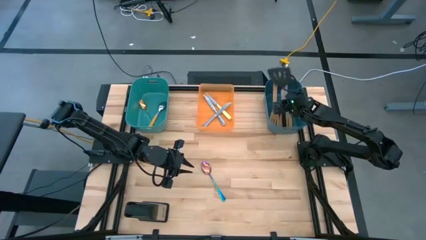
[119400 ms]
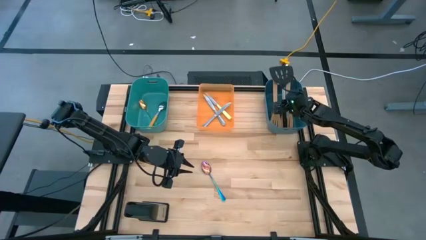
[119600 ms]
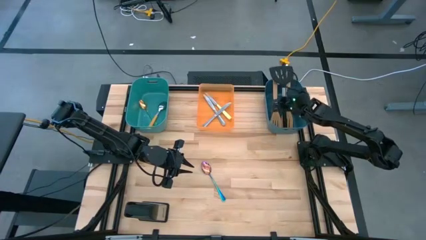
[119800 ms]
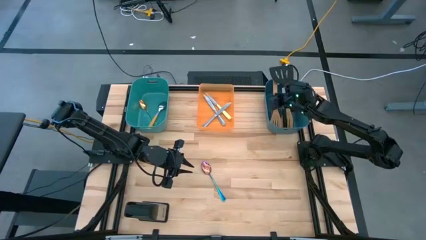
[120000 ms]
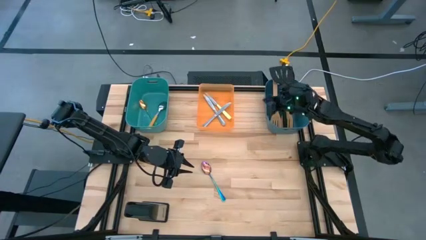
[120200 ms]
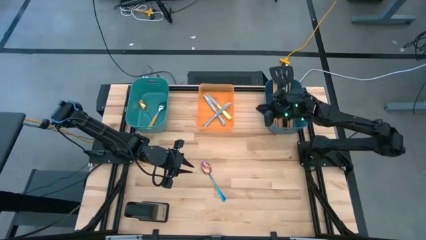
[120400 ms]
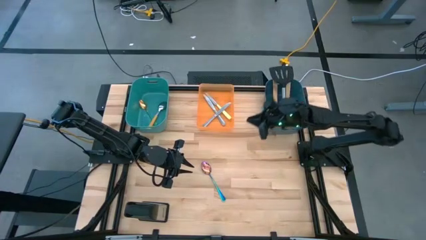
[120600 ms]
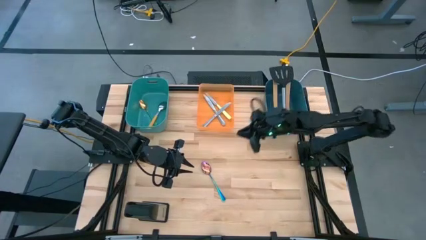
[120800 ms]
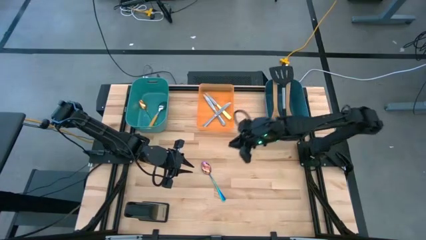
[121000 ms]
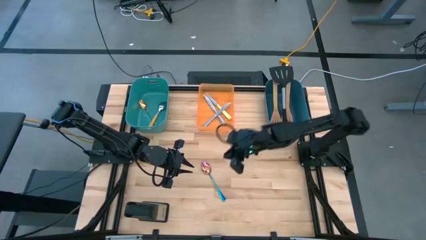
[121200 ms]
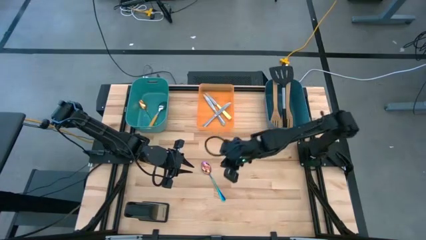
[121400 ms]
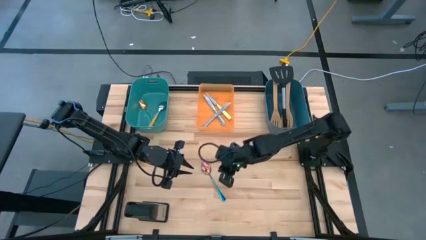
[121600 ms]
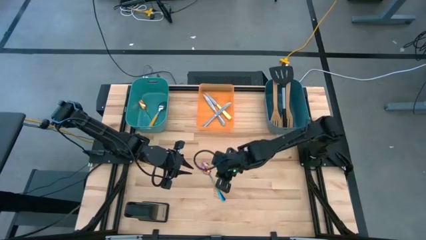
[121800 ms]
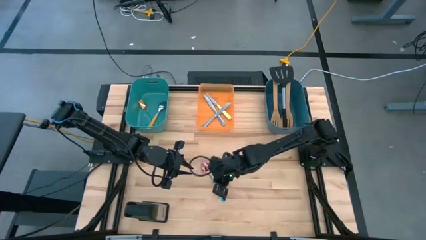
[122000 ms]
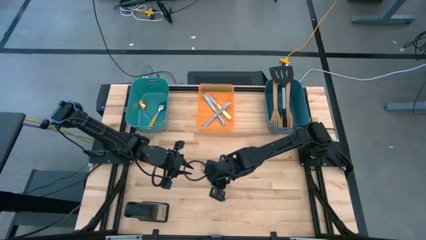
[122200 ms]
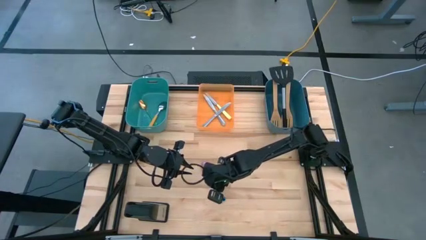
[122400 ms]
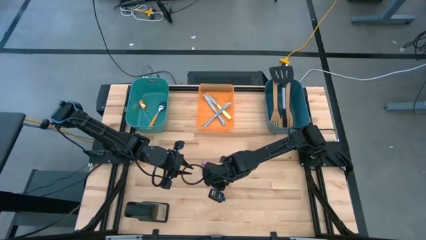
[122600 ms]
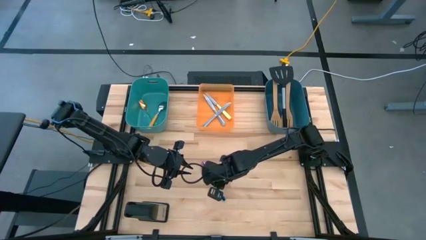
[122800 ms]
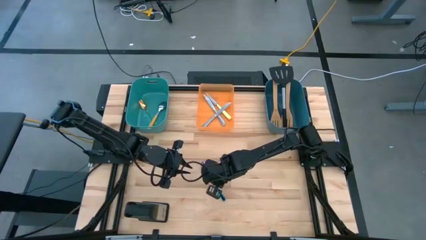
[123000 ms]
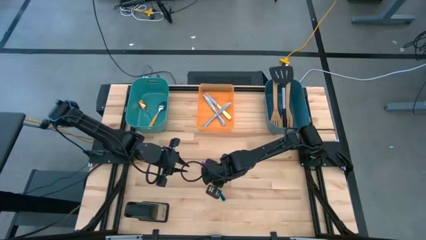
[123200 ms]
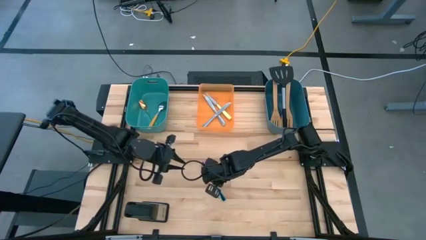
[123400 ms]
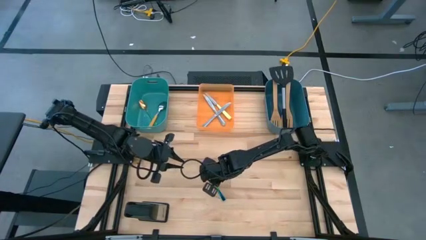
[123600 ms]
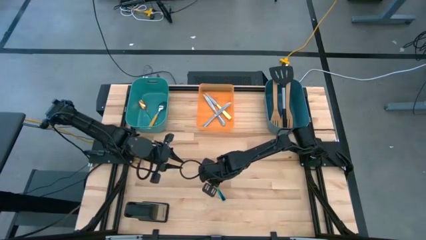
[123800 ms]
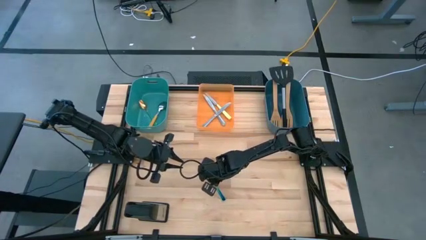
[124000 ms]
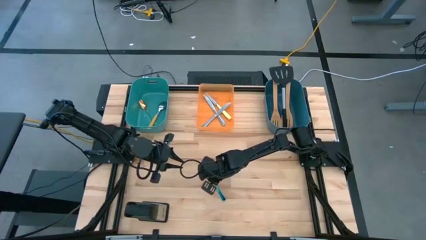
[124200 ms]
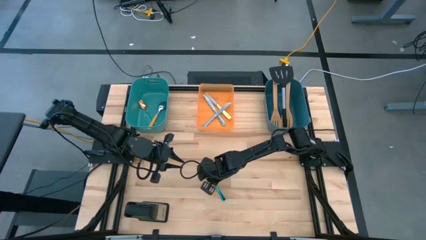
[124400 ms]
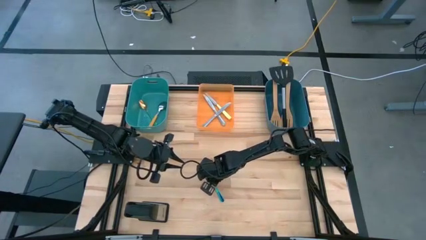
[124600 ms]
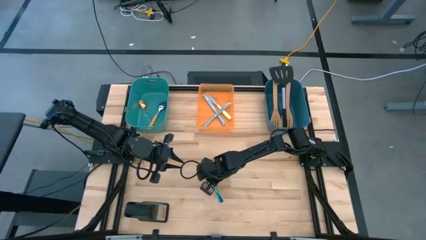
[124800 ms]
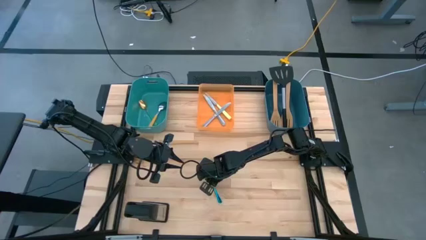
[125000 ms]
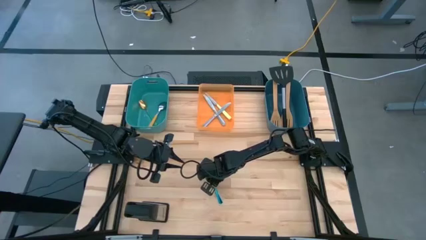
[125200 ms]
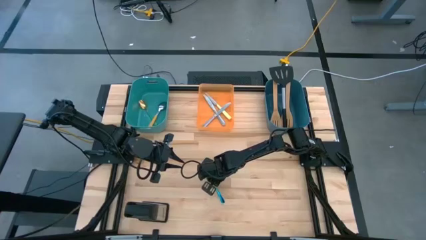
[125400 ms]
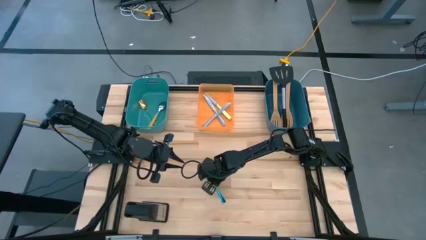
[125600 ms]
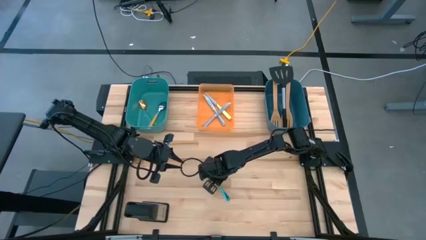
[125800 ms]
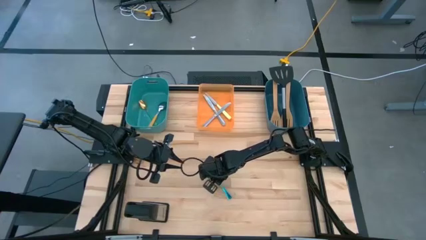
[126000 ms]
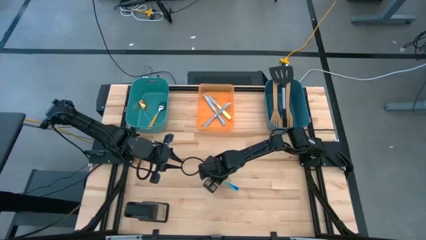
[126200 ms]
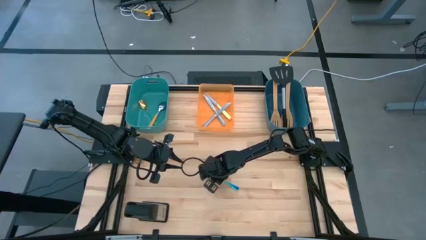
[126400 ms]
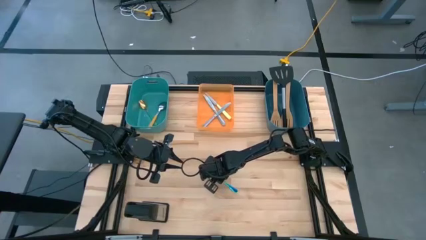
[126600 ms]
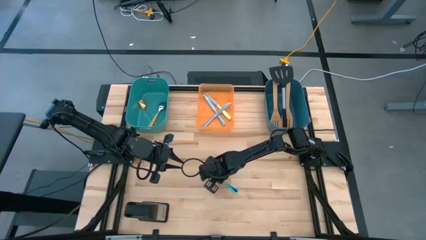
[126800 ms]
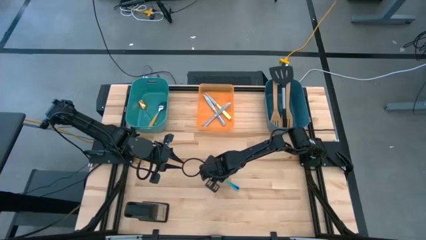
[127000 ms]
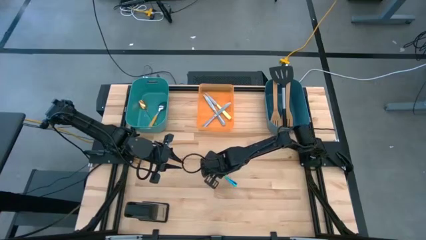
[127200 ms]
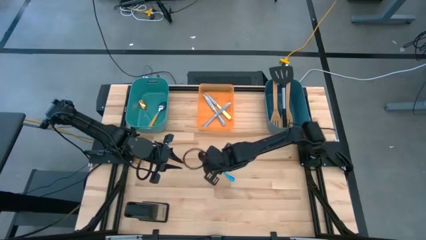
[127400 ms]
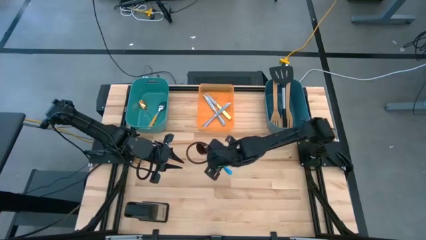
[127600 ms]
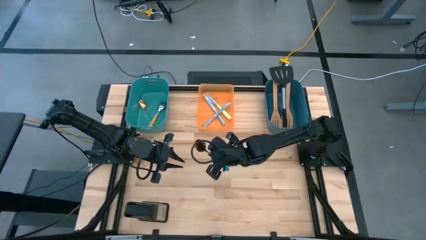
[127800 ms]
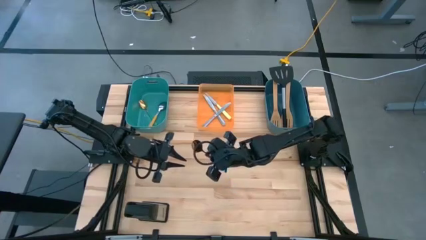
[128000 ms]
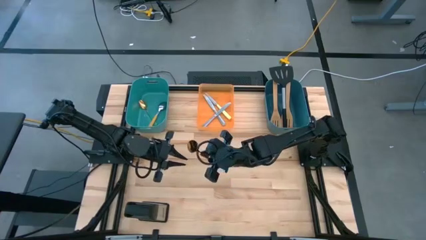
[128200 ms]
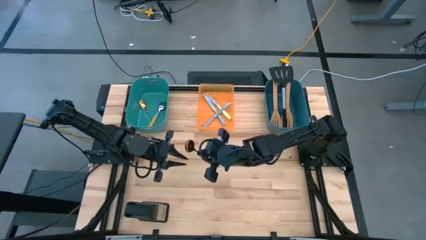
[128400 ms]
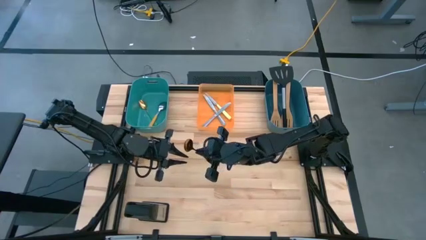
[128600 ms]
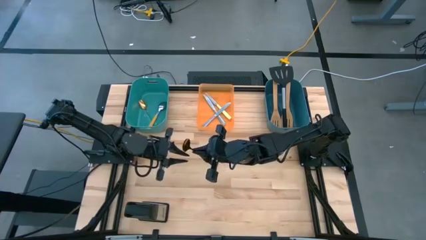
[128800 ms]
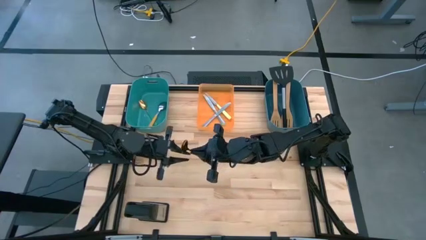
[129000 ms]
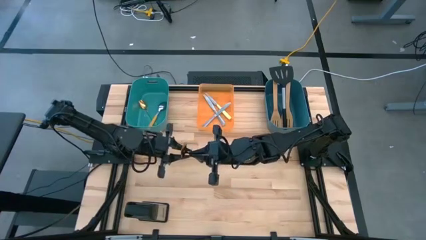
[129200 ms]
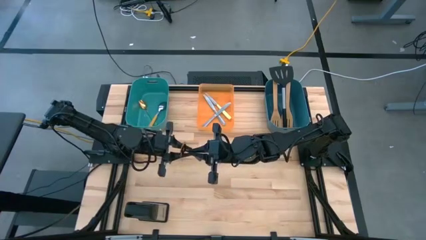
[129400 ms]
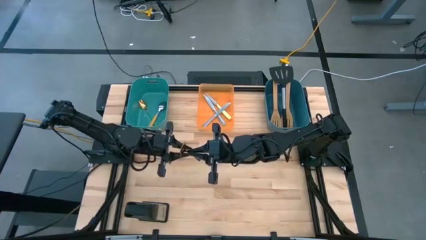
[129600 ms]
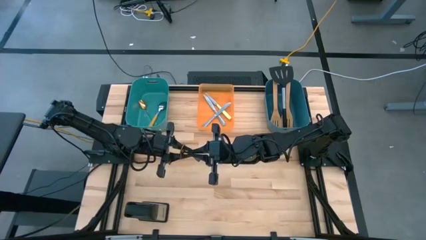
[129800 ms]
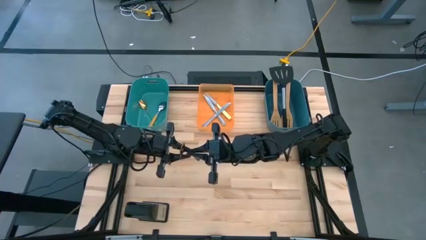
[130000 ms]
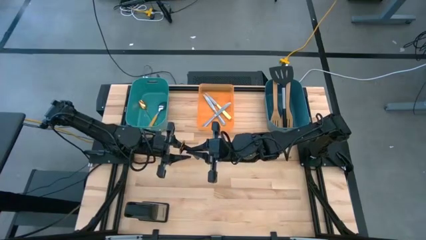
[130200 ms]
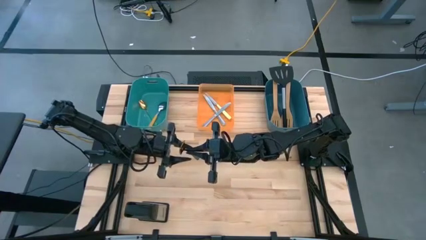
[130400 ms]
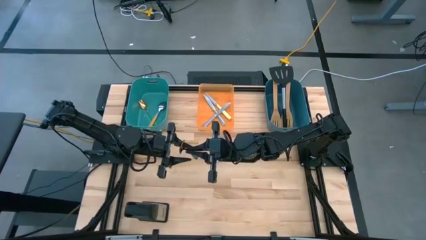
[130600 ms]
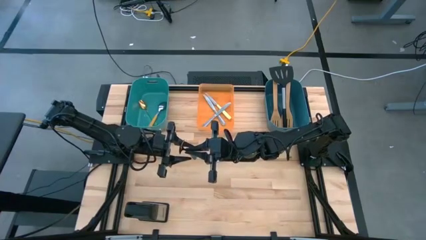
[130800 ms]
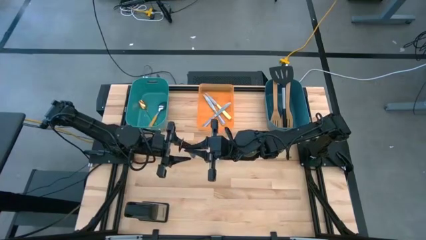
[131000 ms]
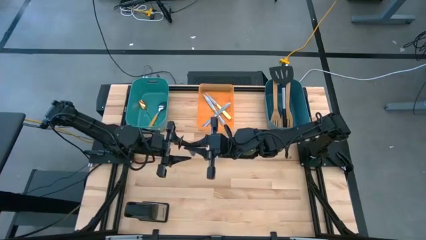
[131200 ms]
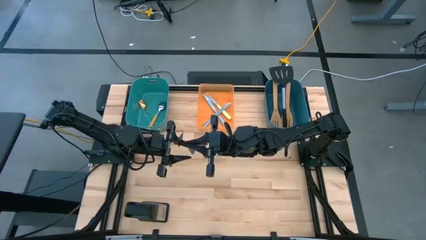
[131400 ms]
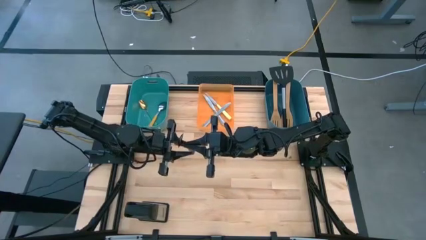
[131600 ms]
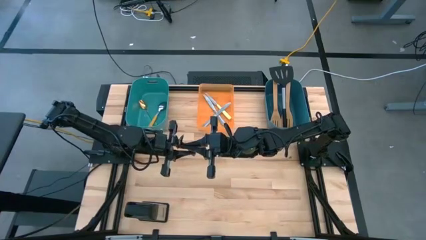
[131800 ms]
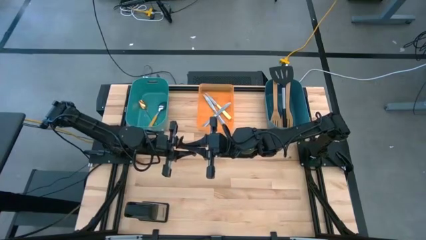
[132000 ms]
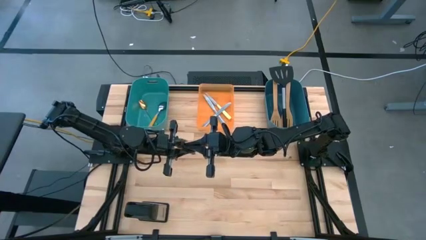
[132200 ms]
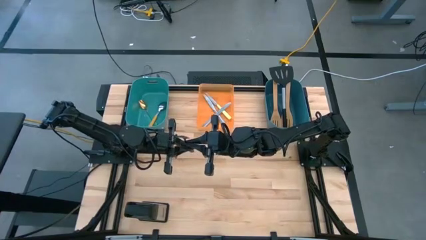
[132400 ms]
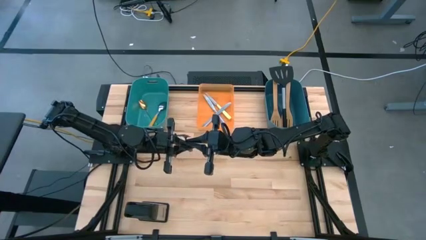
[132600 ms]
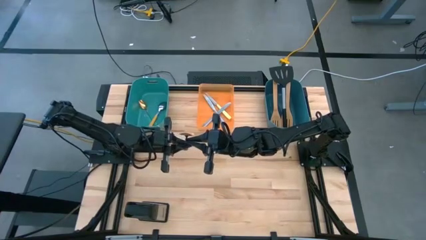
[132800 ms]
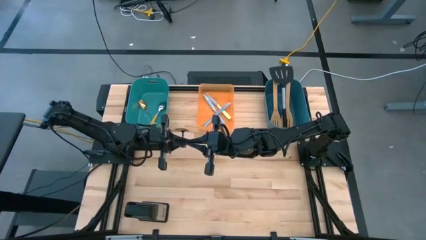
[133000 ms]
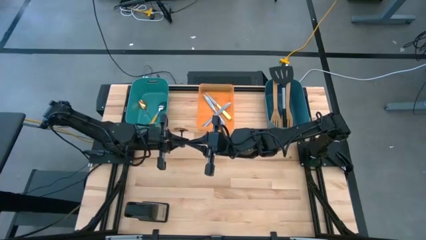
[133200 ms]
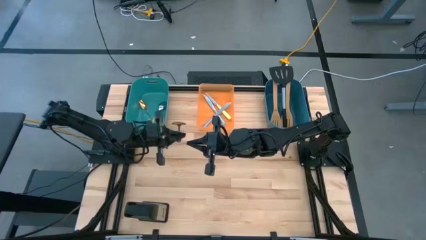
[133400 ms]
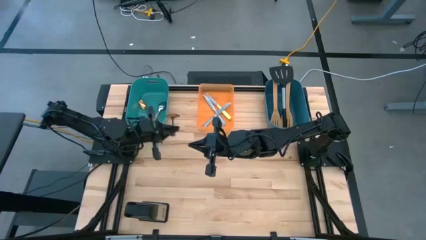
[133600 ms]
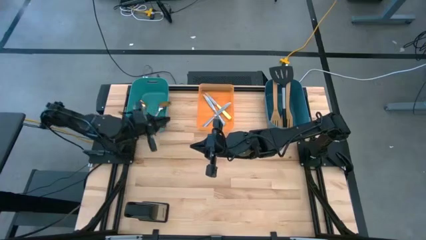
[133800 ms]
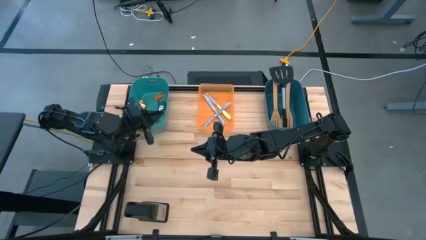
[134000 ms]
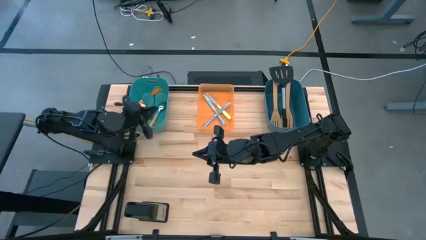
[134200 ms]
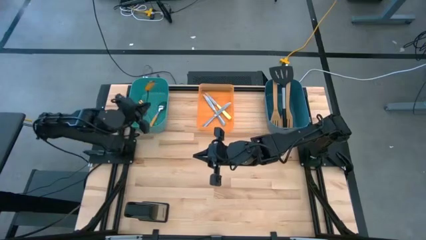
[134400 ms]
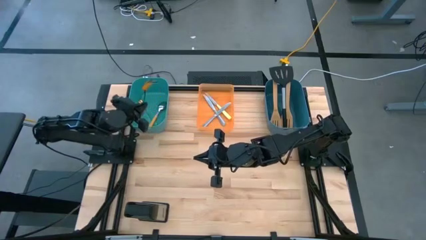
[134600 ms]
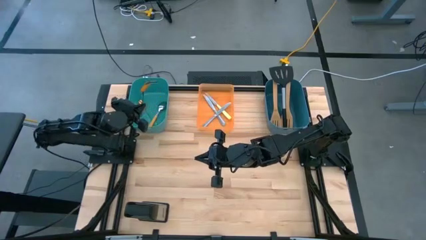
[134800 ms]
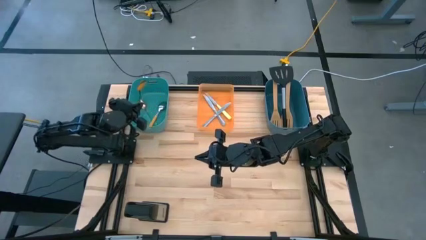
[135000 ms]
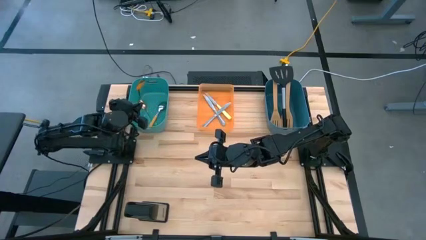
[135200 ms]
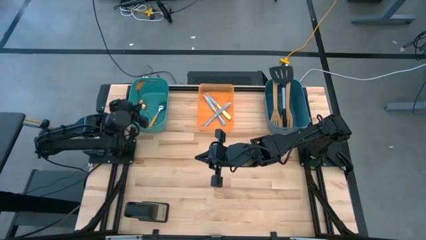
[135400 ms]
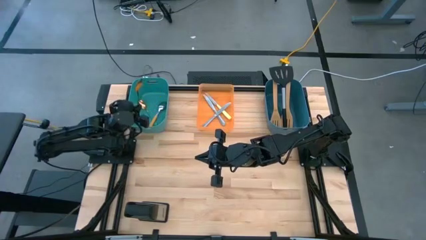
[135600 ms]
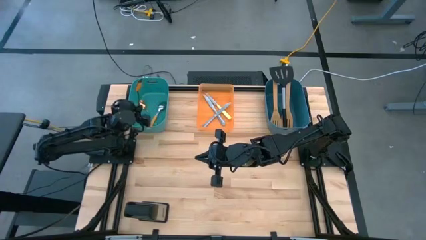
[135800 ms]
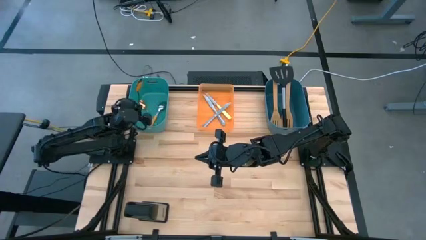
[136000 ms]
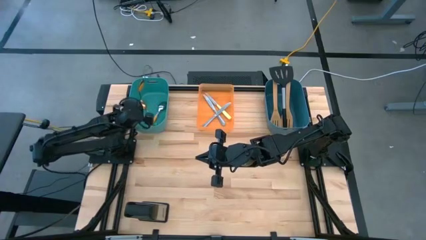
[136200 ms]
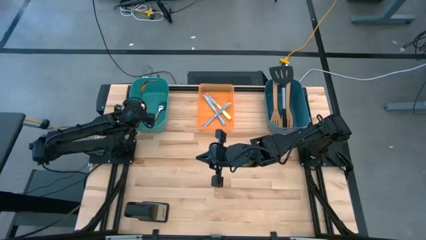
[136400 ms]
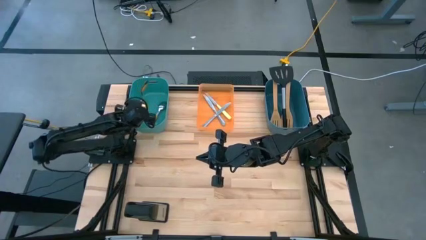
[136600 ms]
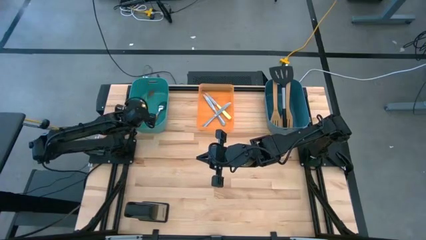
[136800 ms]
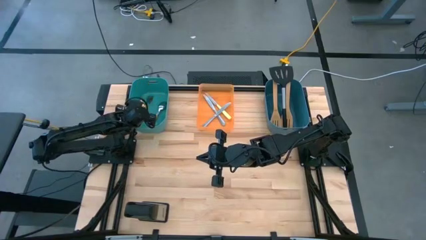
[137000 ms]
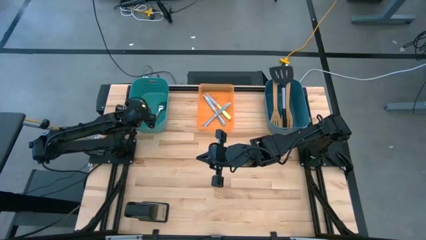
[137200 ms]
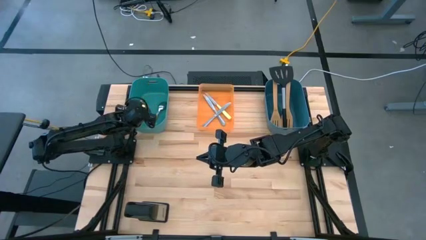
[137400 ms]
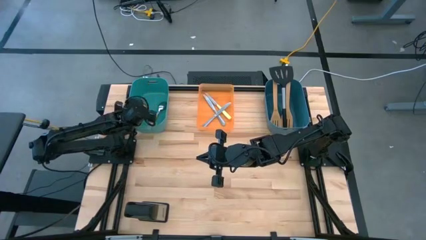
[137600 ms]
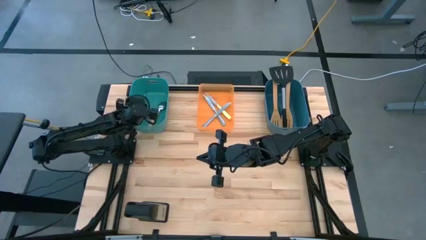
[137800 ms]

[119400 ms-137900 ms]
Task: Pick & Place Kitchen Items
Put the blue spoon into the green bin
